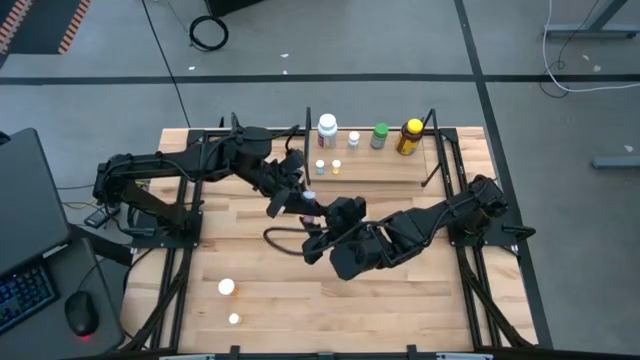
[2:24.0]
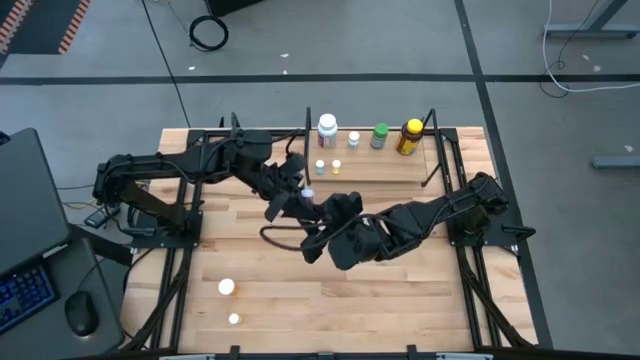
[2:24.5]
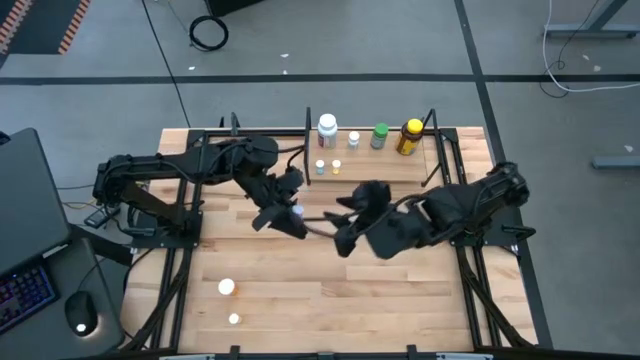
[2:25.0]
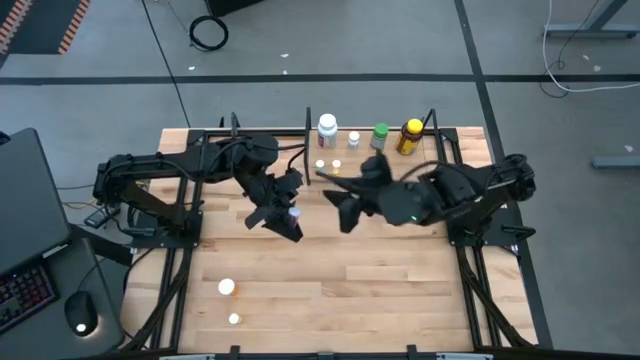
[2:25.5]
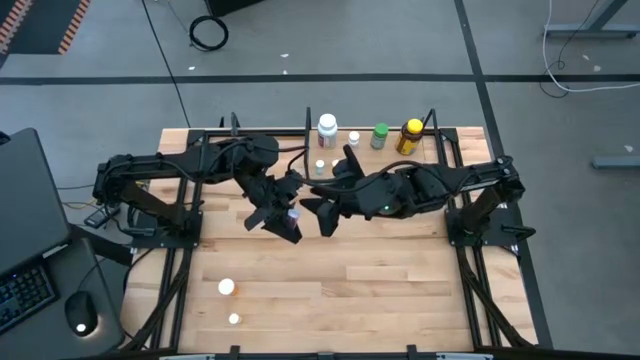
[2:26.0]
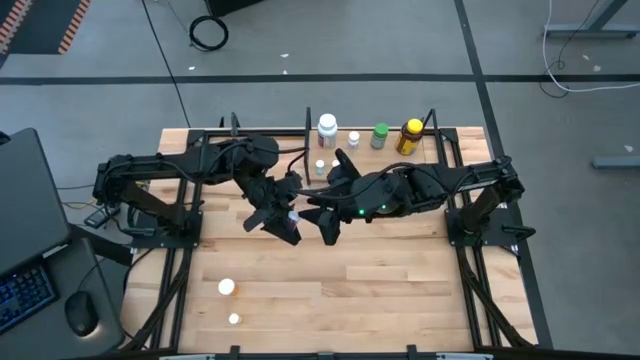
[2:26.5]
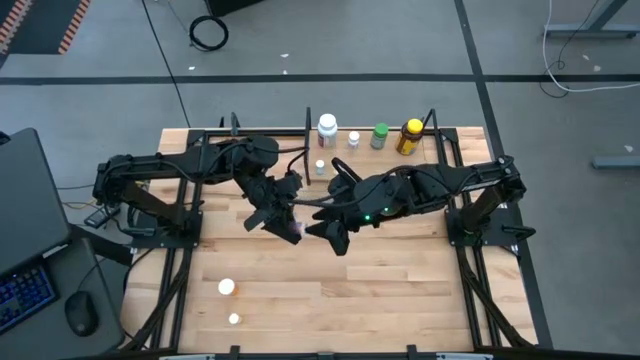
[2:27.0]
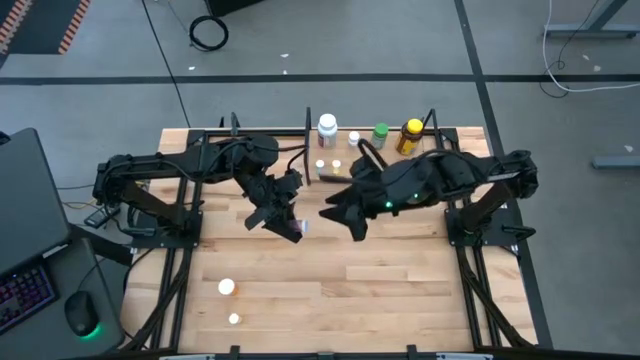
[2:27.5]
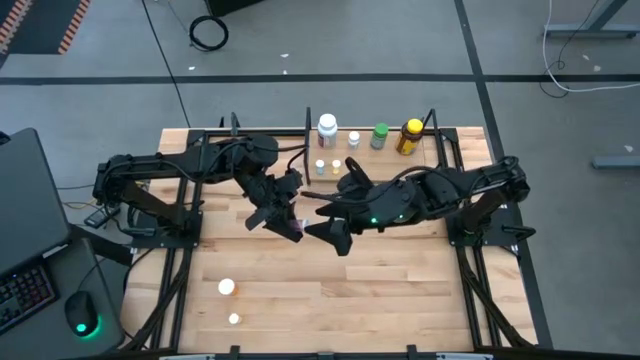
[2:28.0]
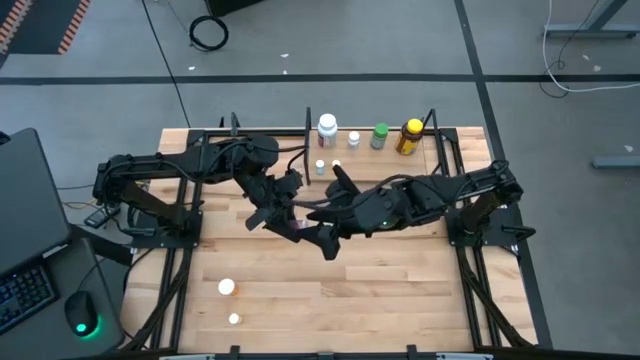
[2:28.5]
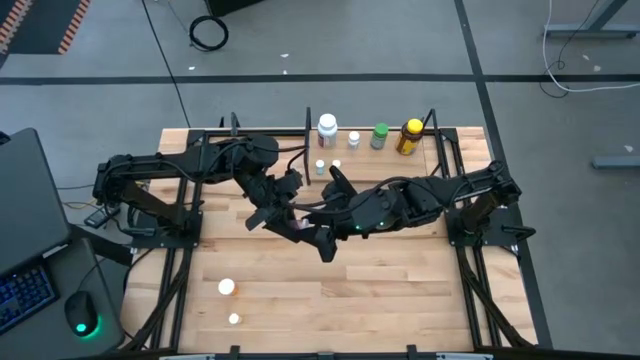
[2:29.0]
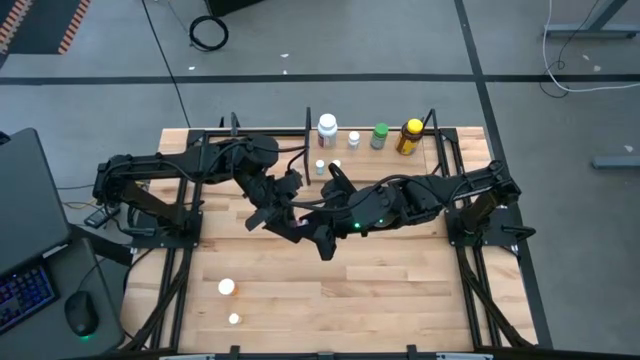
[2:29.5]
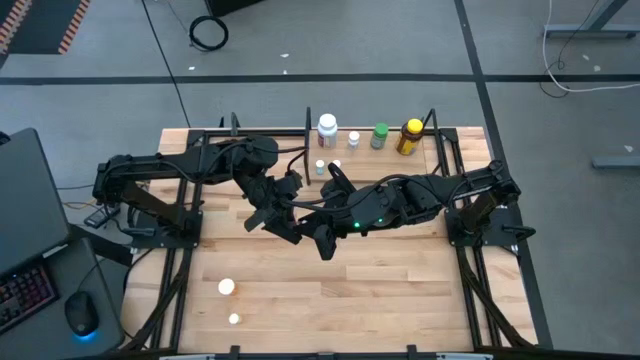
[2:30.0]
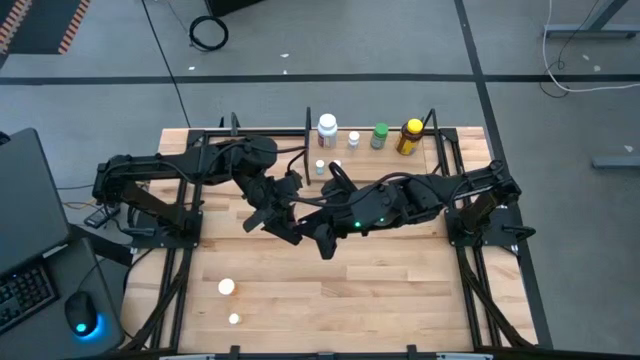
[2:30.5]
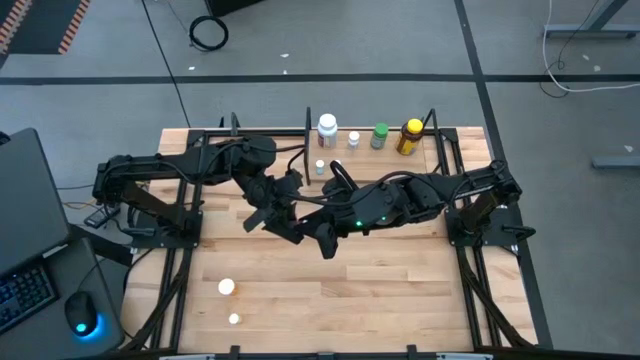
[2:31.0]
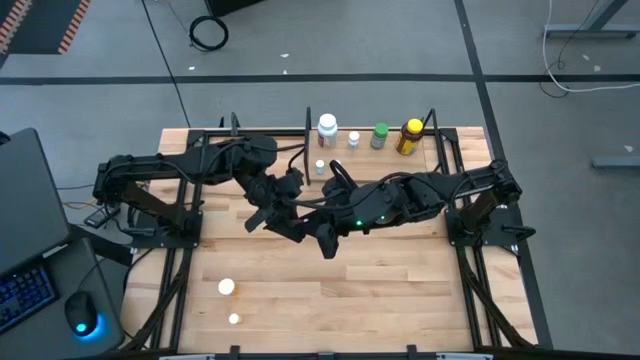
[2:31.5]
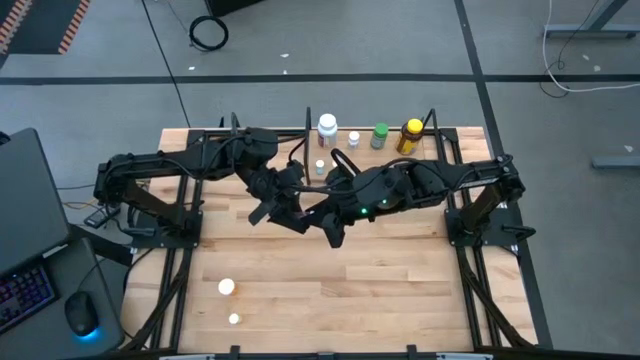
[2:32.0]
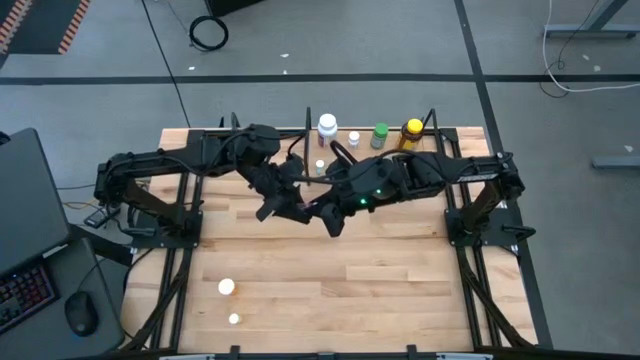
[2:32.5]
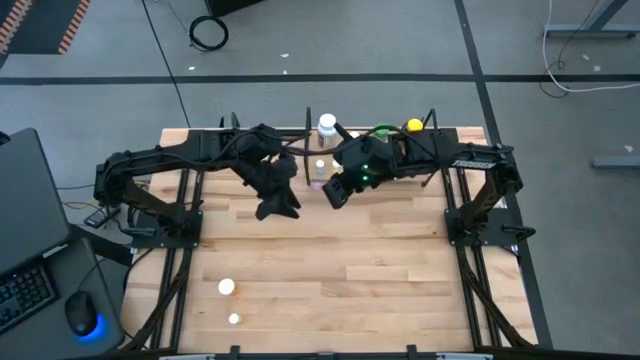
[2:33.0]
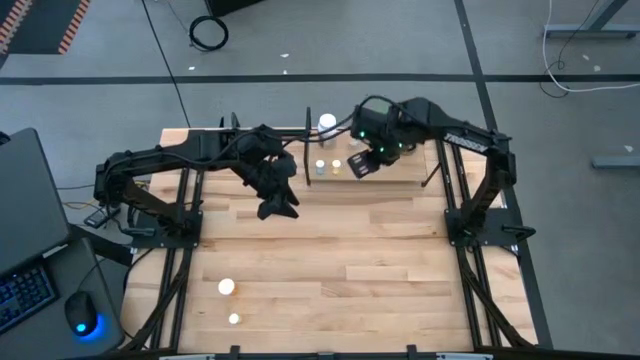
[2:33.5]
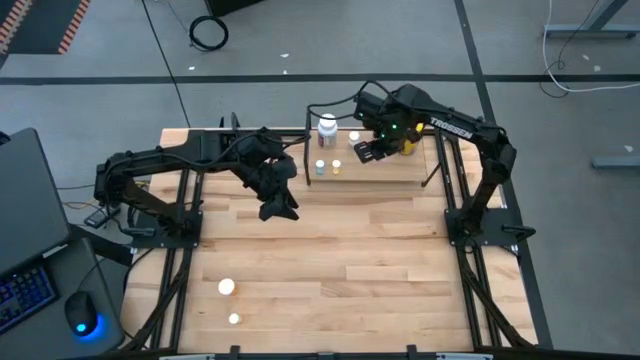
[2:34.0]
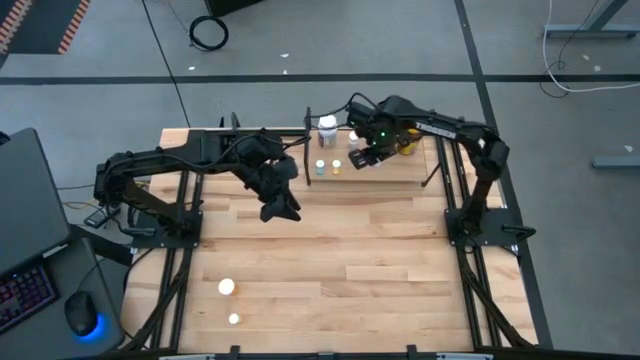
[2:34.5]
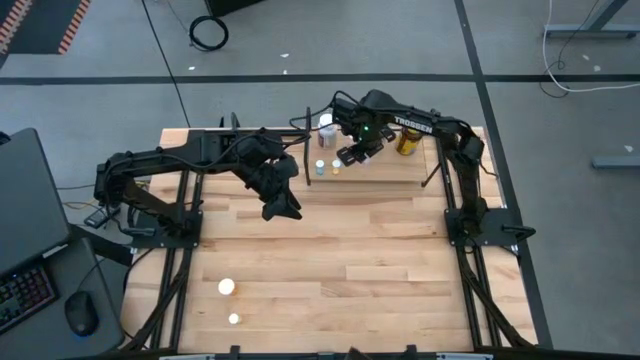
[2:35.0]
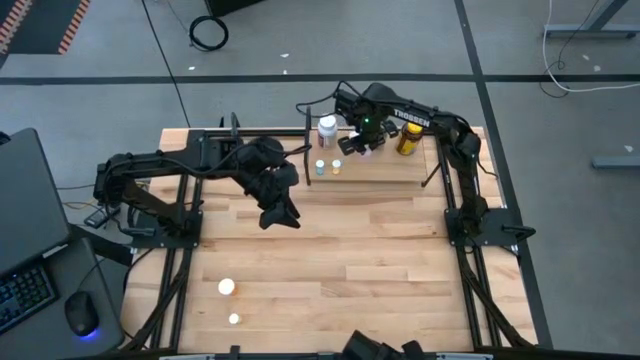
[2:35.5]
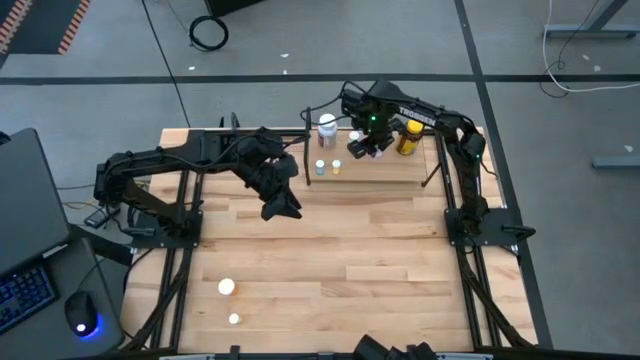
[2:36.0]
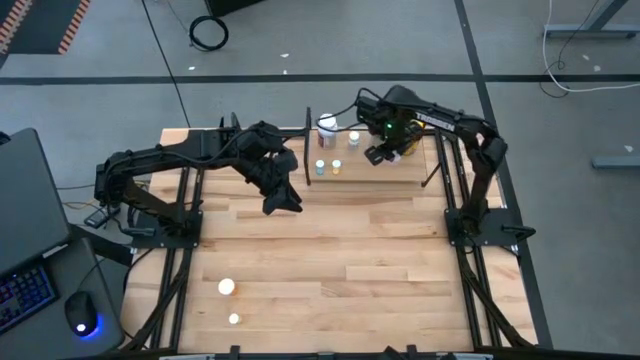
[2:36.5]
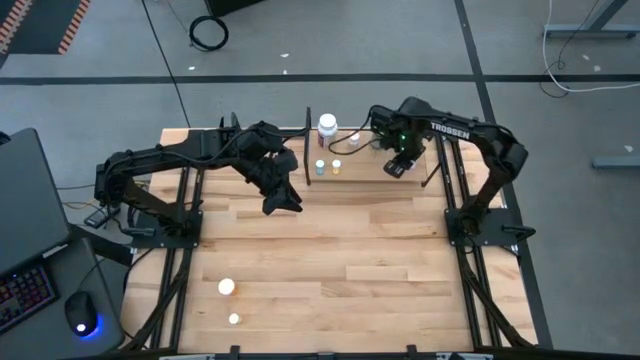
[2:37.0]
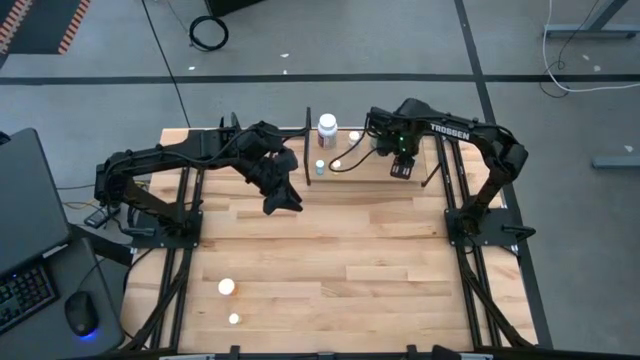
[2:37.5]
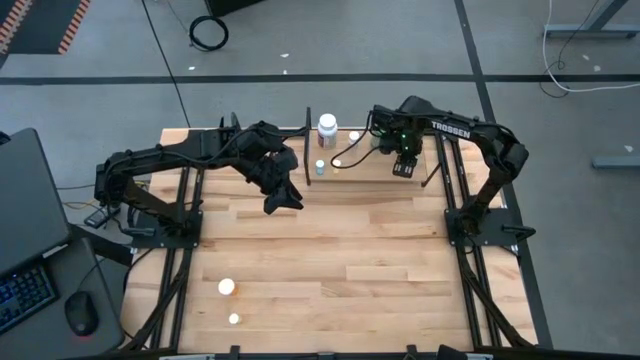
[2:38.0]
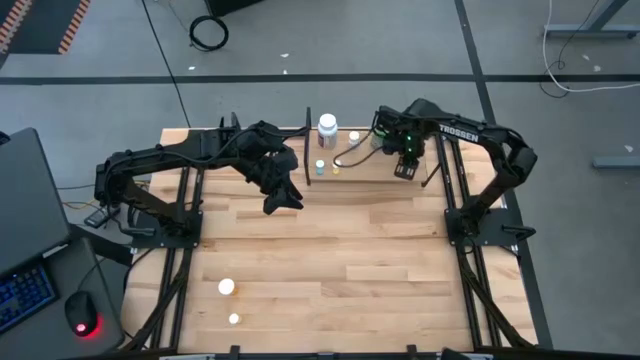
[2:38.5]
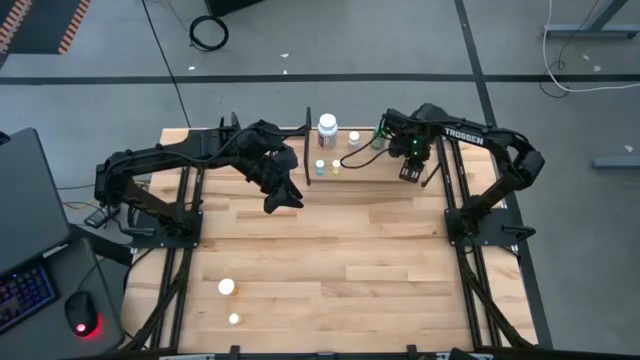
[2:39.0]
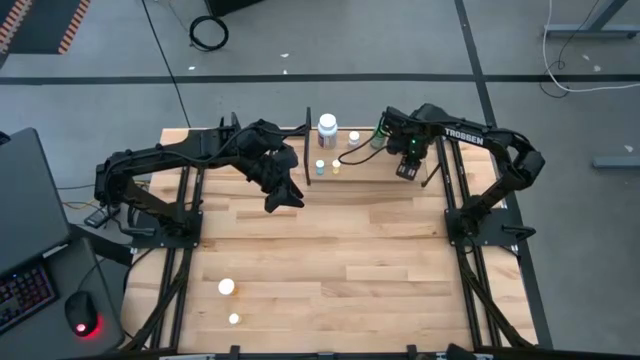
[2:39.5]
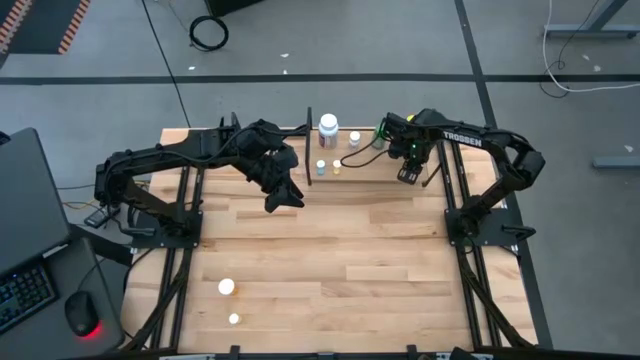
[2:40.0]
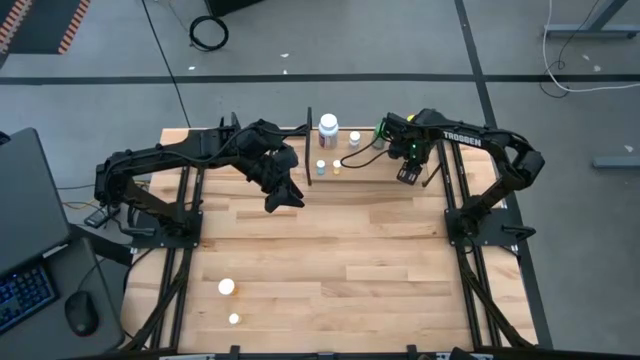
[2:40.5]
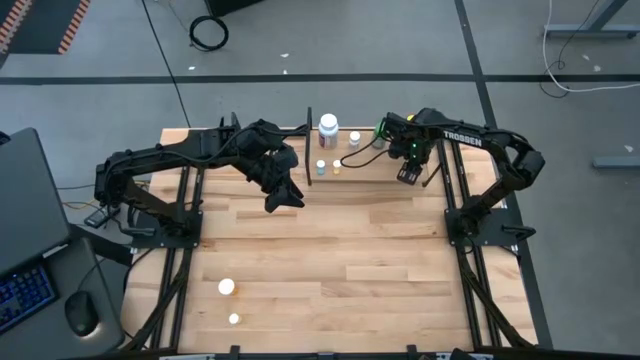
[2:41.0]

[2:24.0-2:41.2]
Task: Pick and place medicine bottles onto shelf by color
Put the pink pill bottle on the shelf

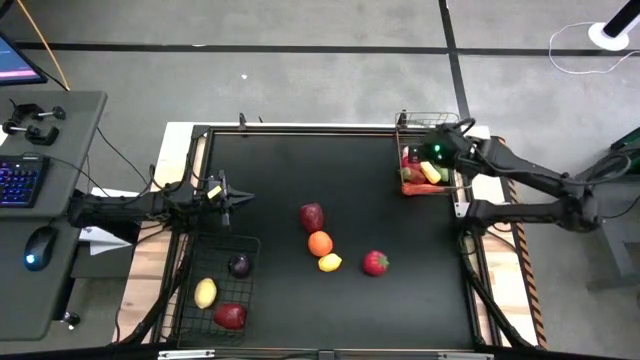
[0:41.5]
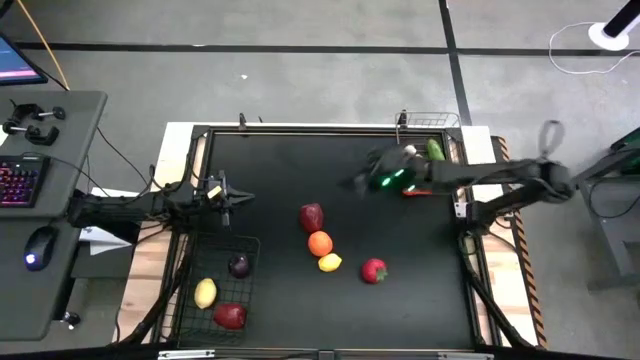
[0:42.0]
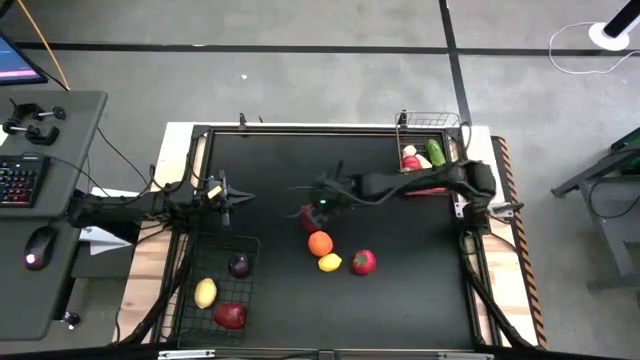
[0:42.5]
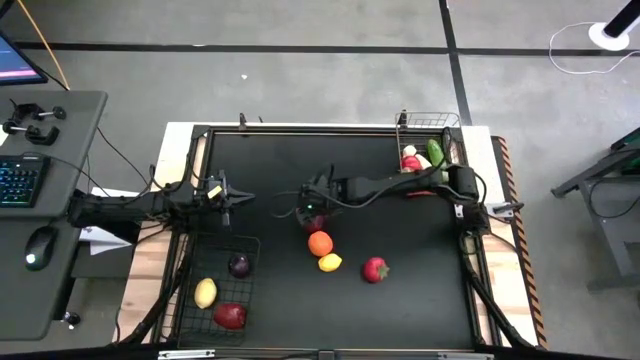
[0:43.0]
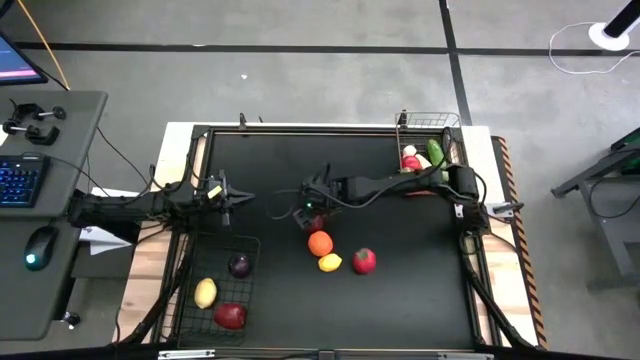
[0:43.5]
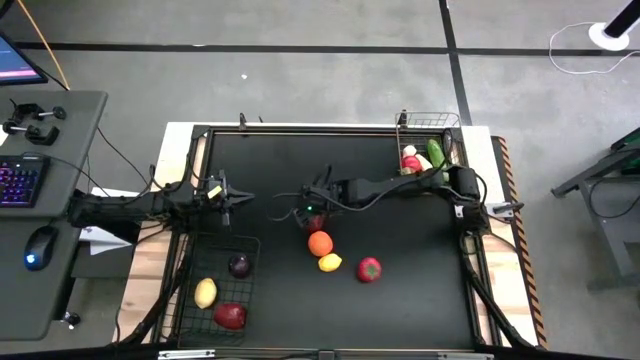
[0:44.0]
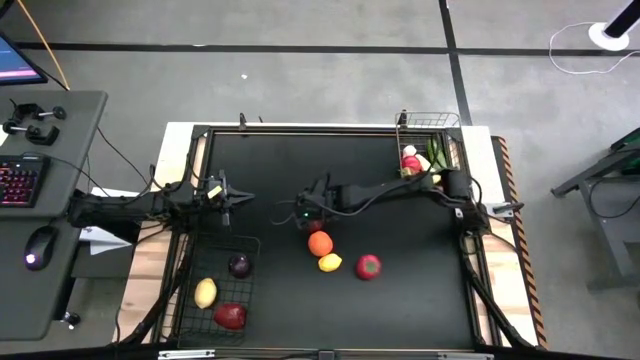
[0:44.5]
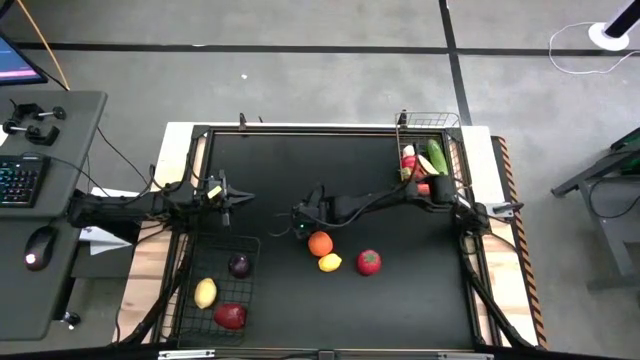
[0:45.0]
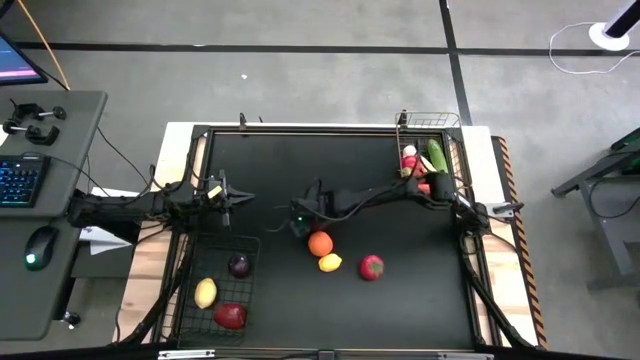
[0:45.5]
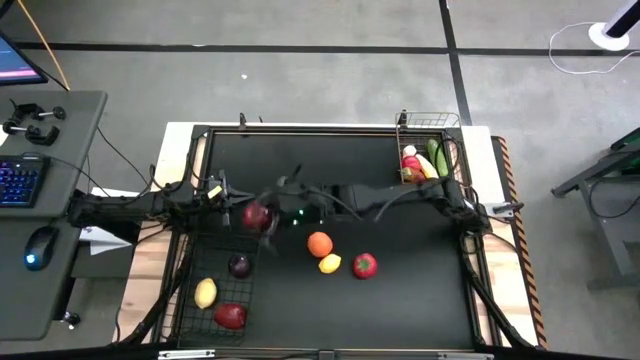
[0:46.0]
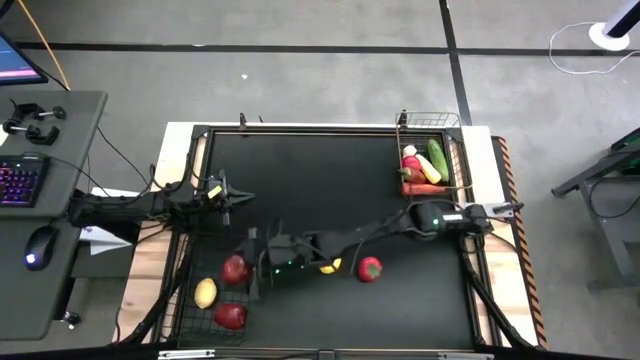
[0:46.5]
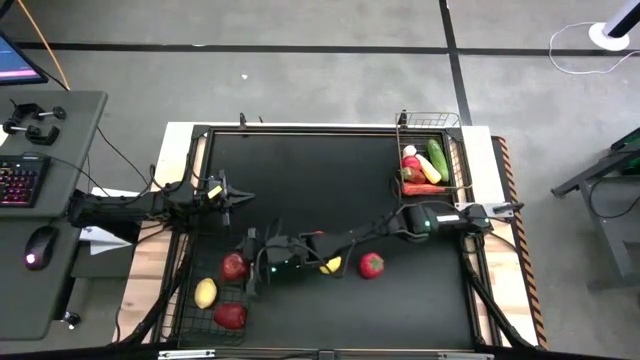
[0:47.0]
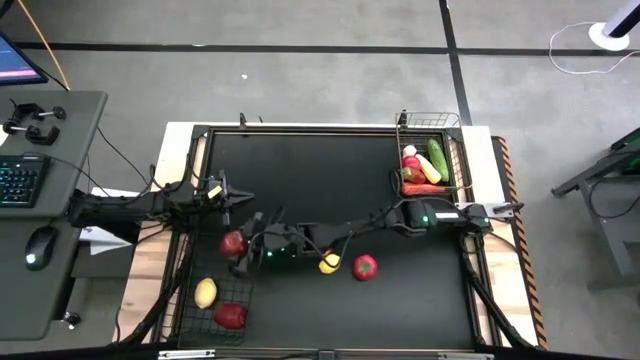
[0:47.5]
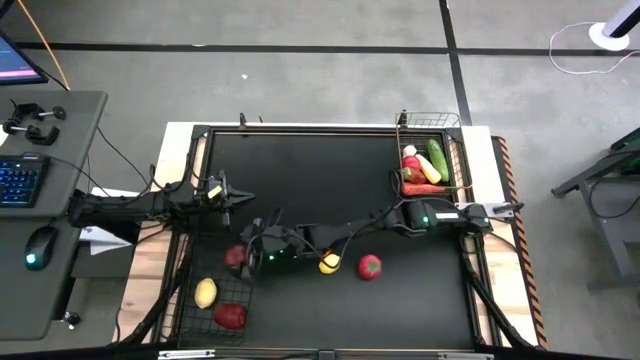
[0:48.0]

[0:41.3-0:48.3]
Task: Sort produce into baskets
Put the apple into the left wire basket
